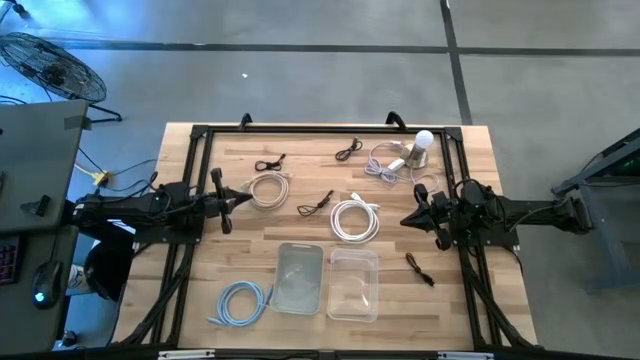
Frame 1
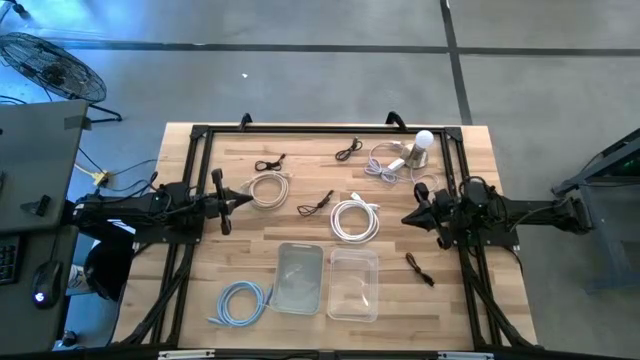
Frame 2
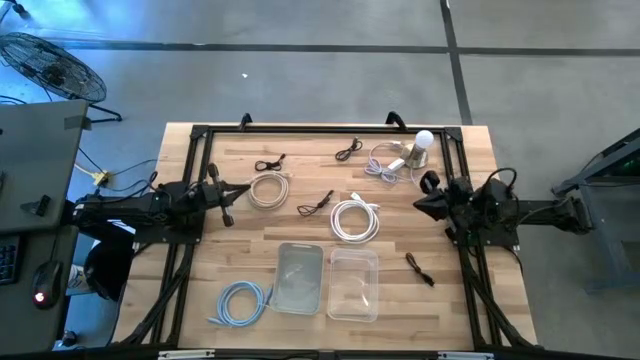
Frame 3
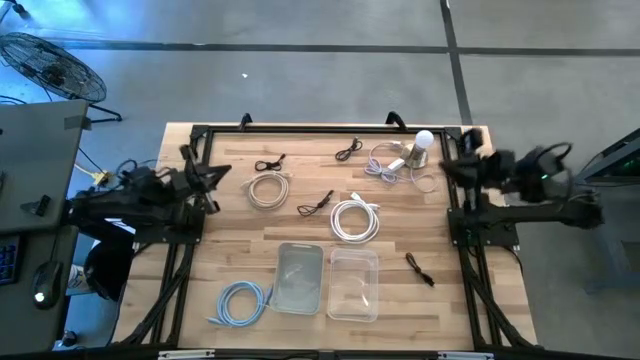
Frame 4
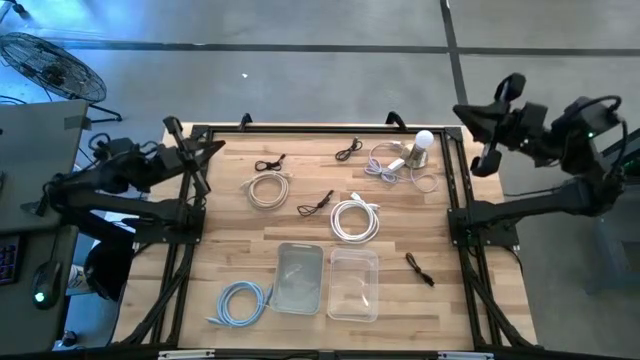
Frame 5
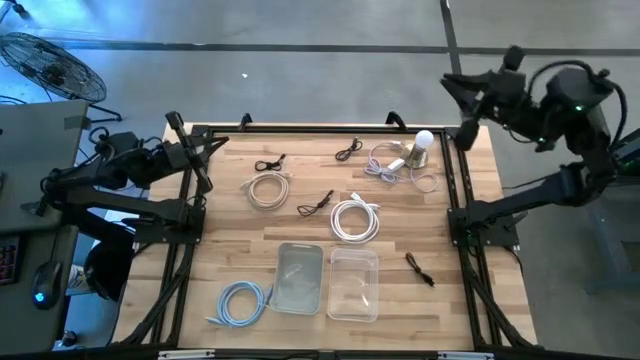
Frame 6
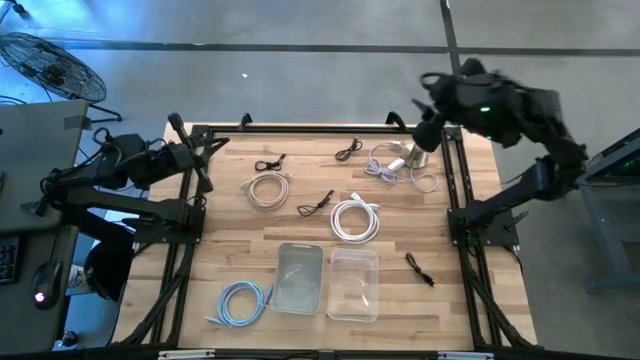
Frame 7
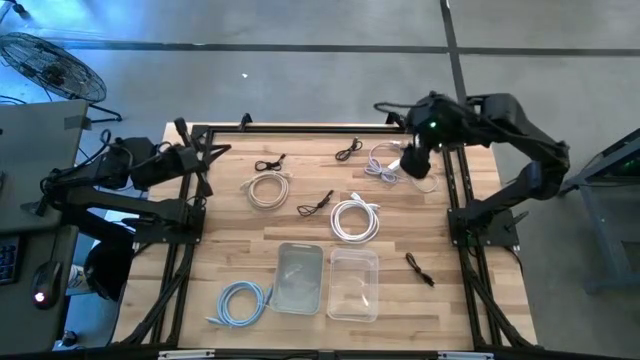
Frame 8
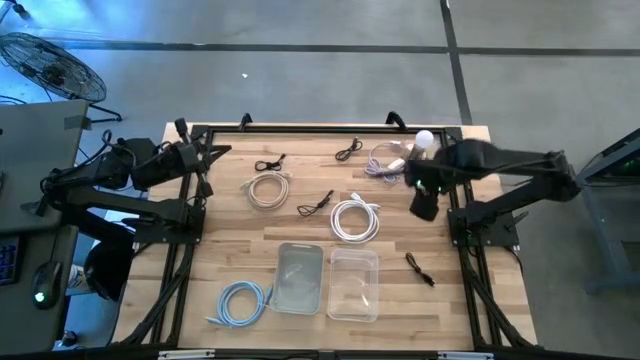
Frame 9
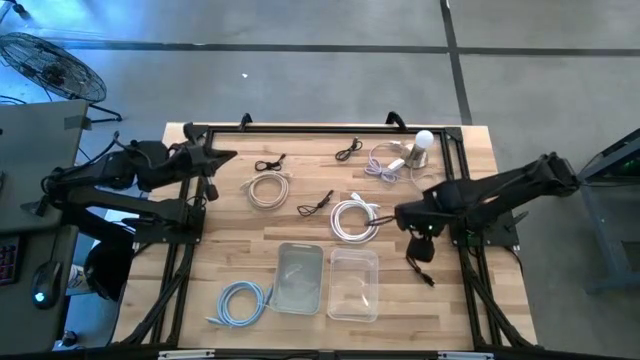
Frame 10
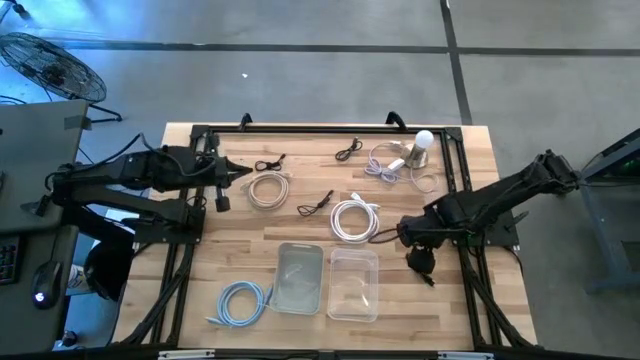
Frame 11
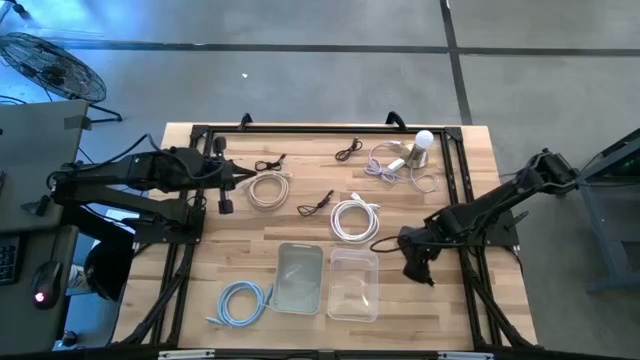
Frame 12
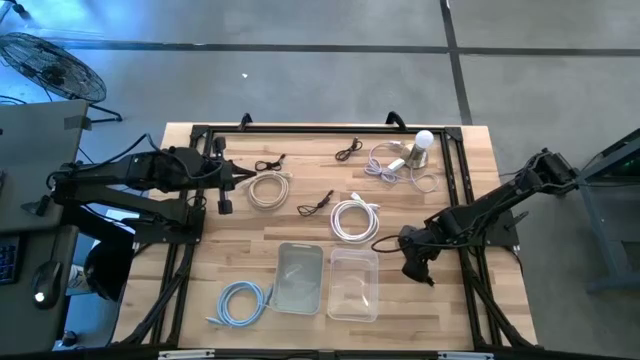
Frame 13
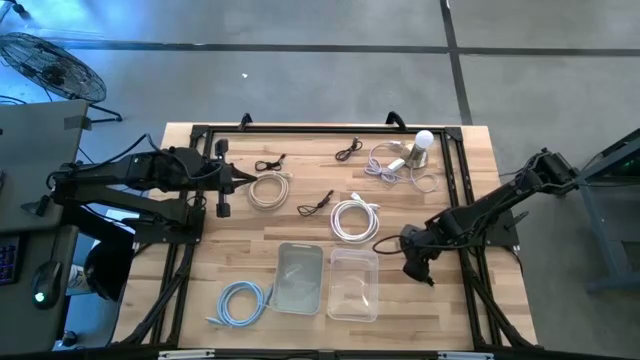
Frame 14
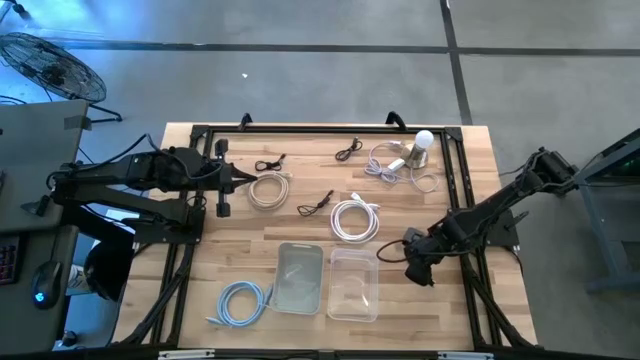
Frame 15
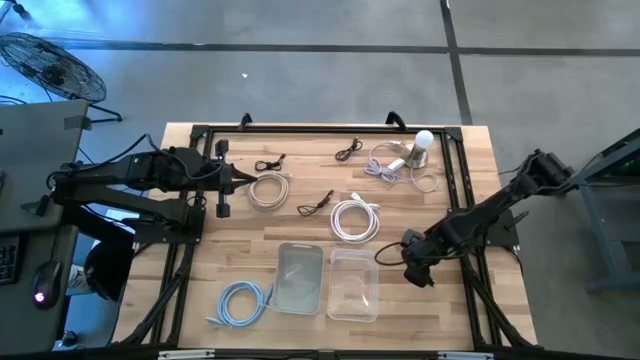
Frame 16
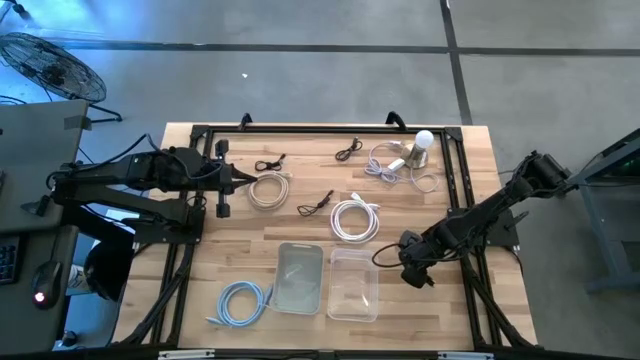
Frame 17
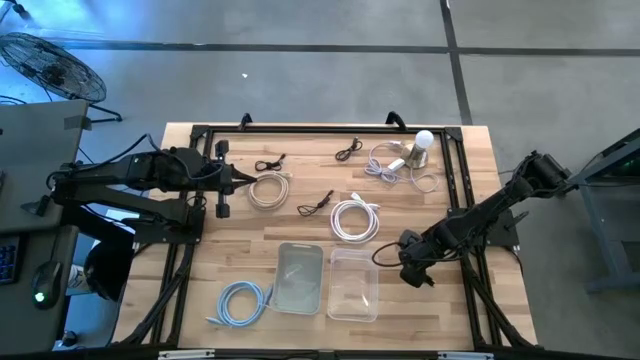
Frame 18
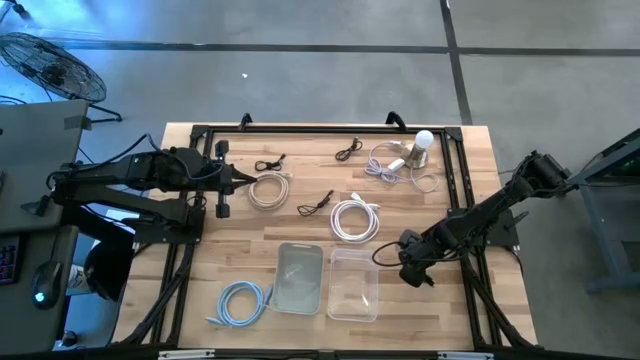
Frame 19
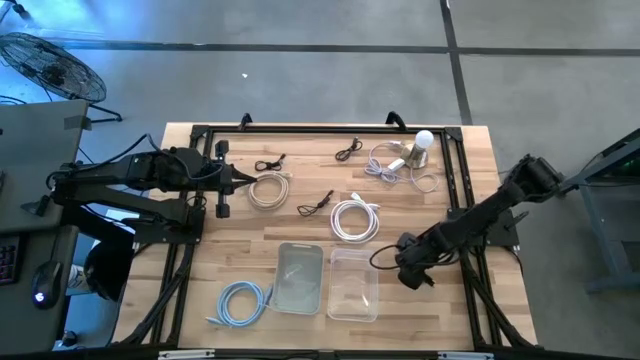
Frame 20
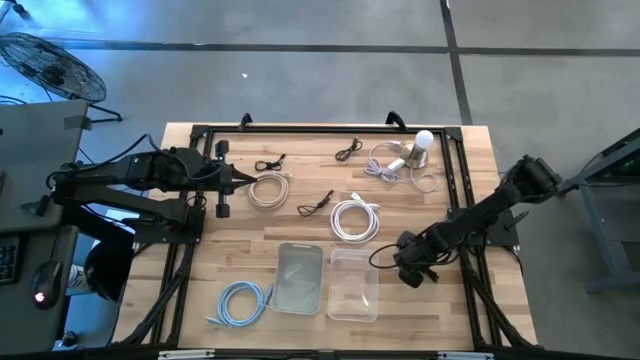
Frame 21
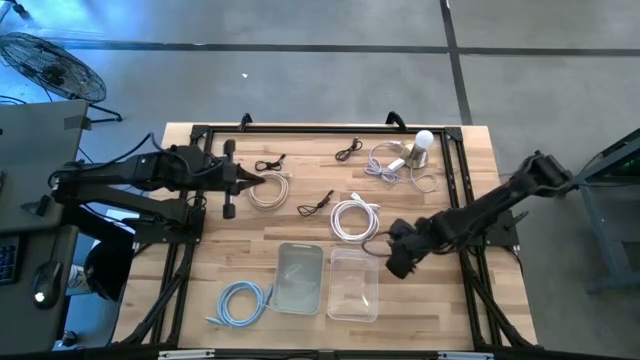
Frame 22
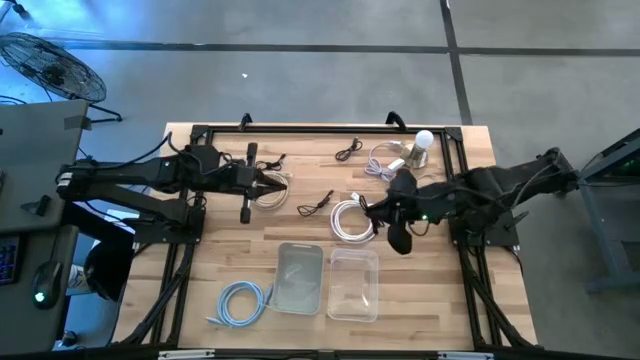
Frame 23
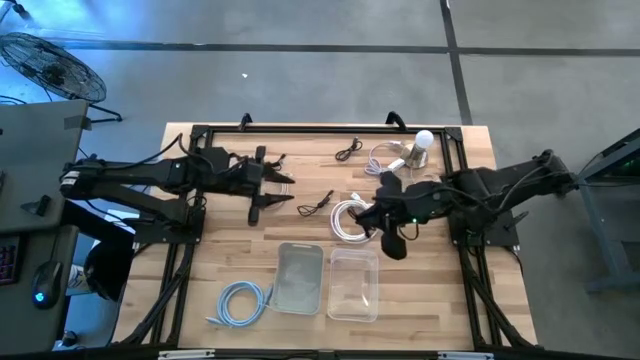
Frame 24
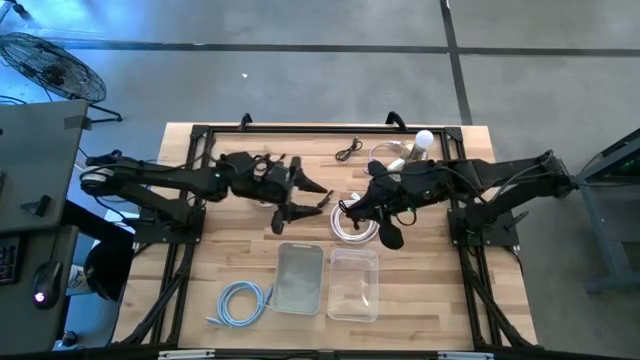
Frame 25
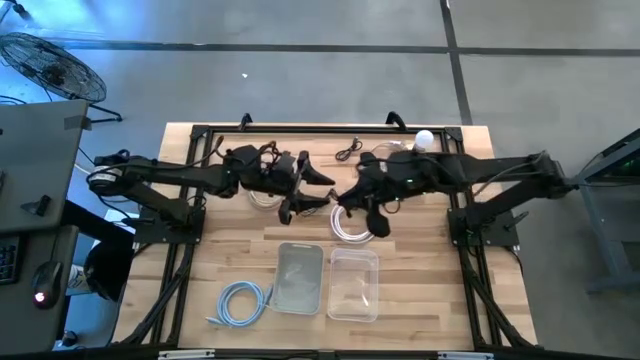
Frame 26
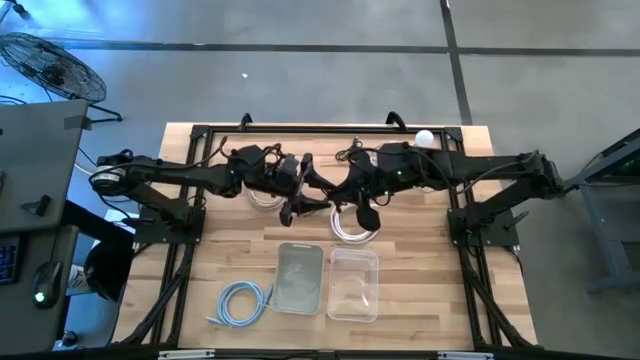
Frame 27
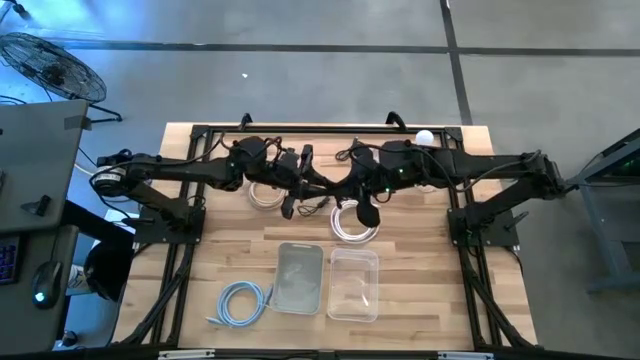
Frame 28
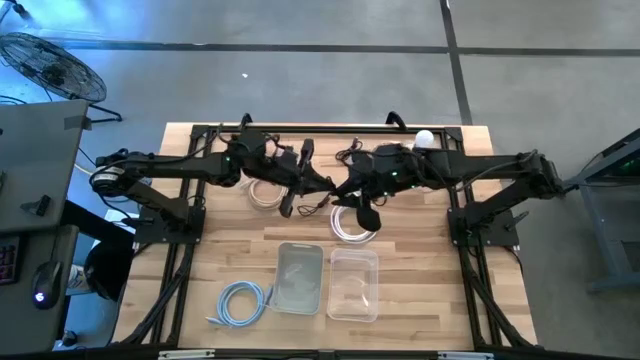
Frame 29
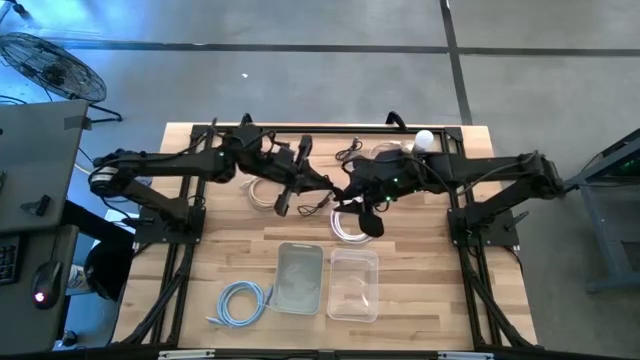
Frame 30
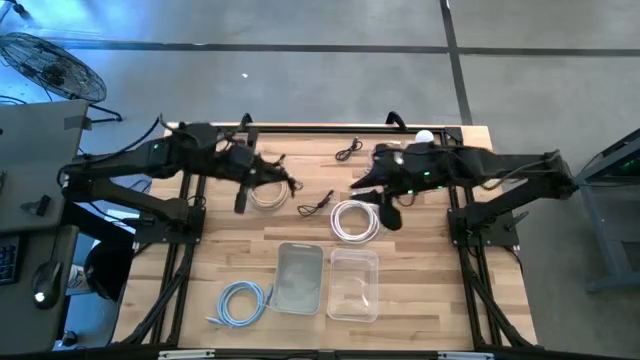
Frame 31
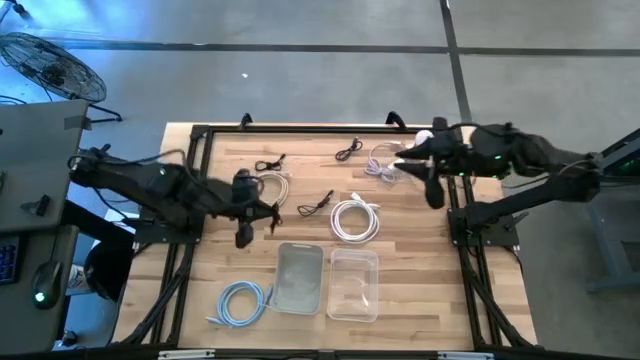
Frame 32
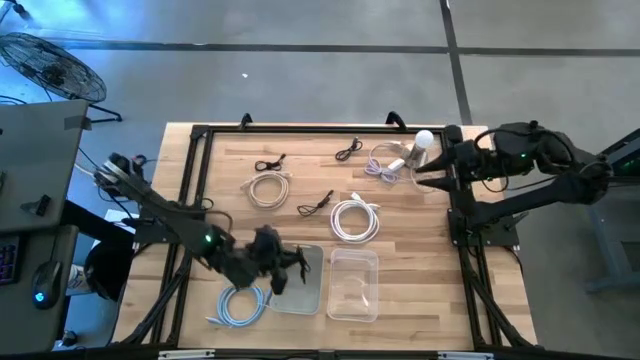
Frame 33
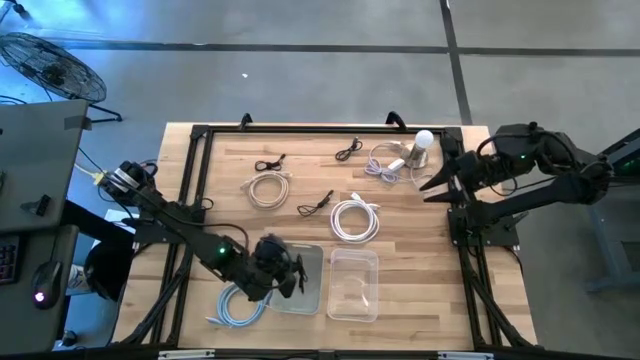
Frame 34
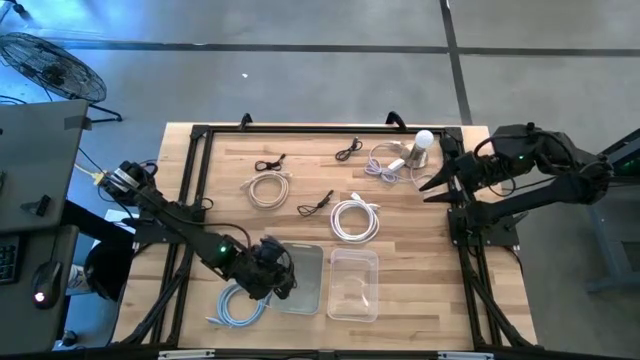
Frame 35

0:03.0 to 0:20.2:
Task: Pick & Place USB Port
Put the black USB cable into the gray bin
